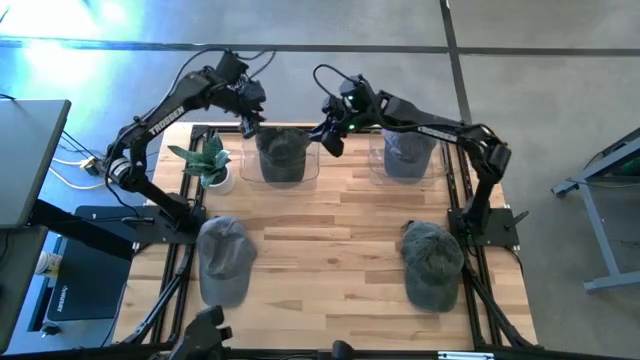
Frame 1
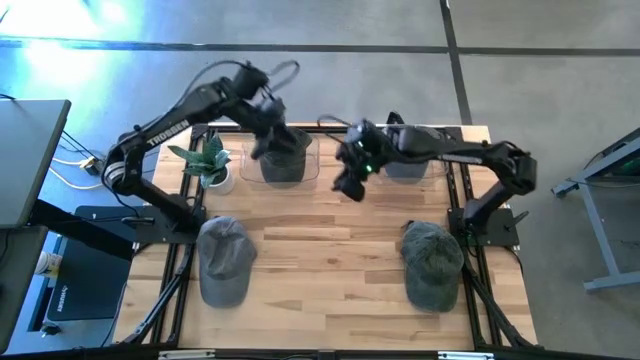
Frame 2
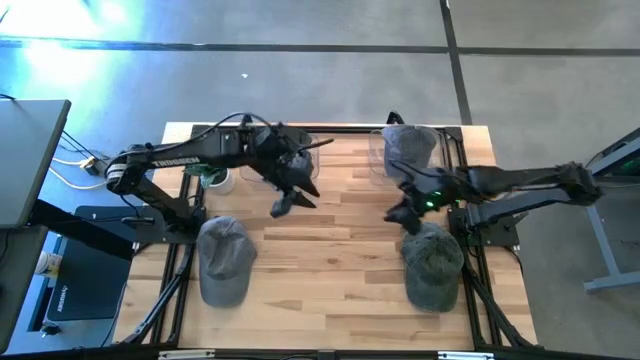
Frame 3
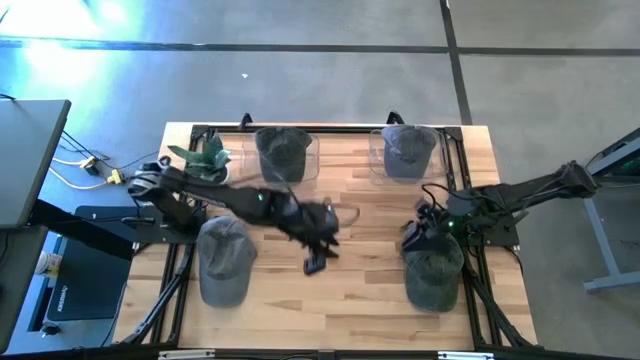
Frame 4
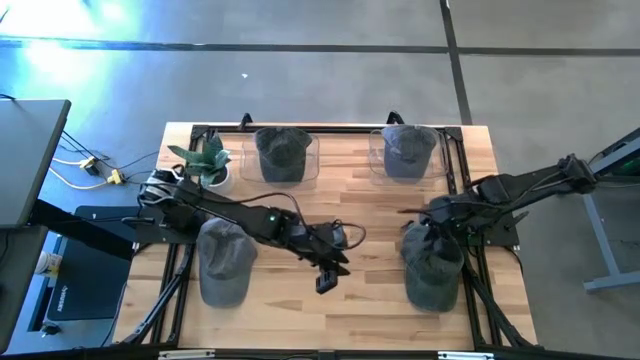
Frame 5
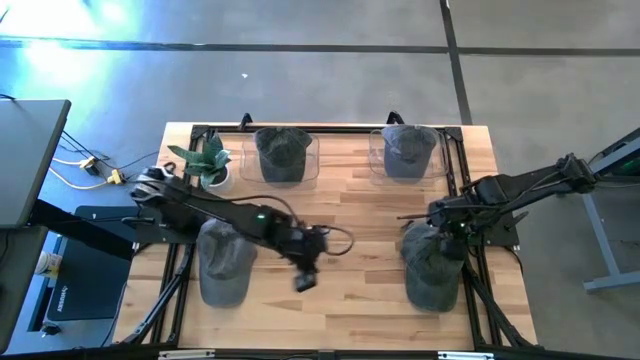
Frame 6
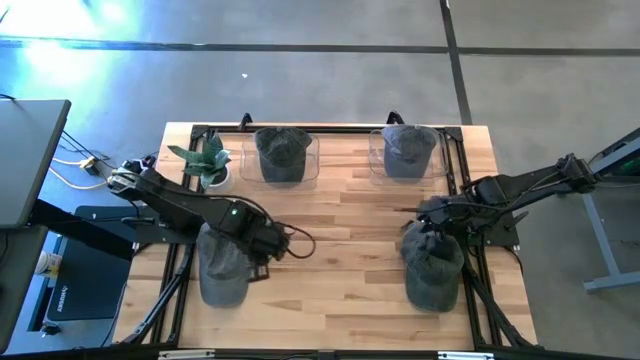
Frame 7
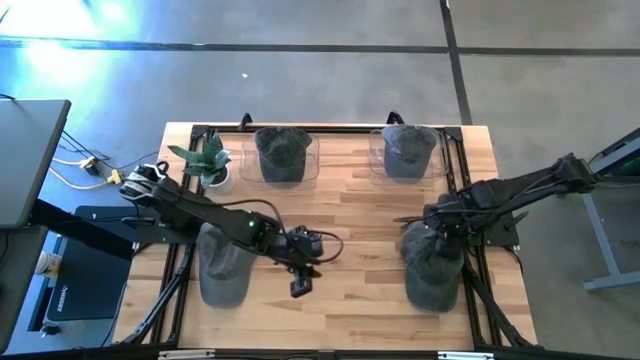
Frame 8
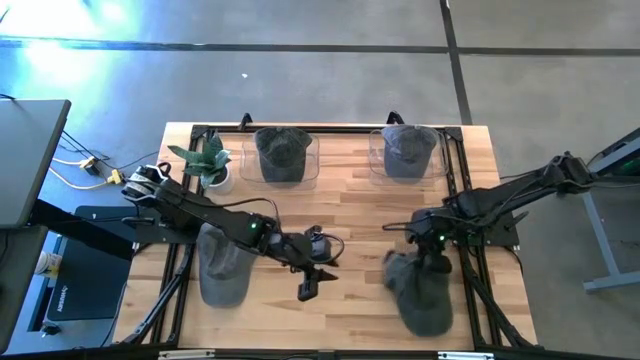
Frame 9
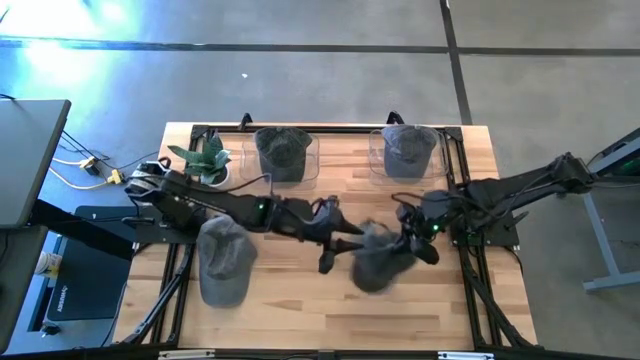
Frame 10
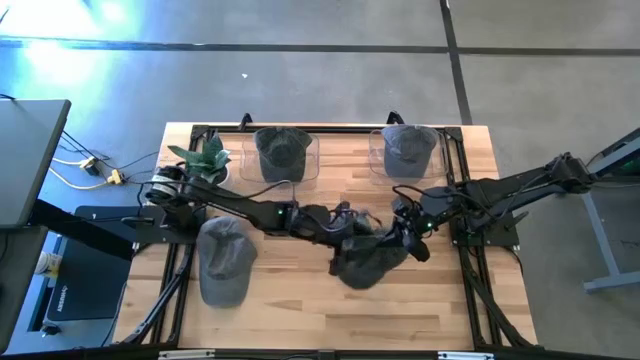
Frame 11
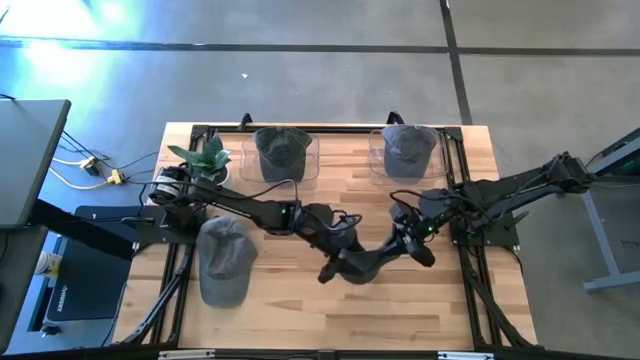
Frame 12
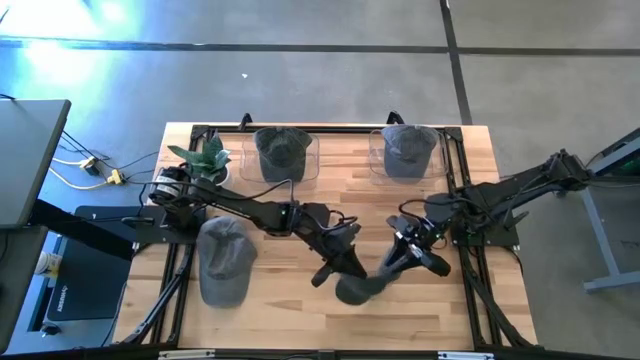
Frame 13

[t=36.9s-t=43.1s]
Task: Pick & Place hat
Put the black cap into the left transparent bin

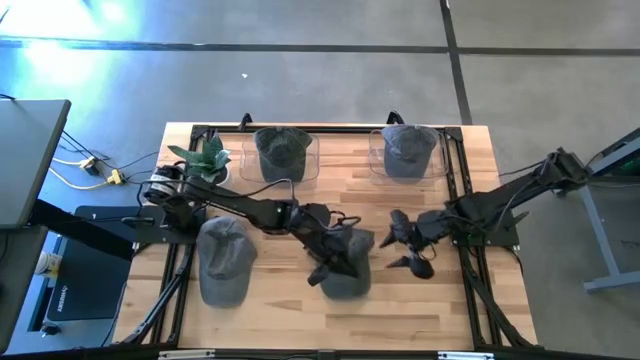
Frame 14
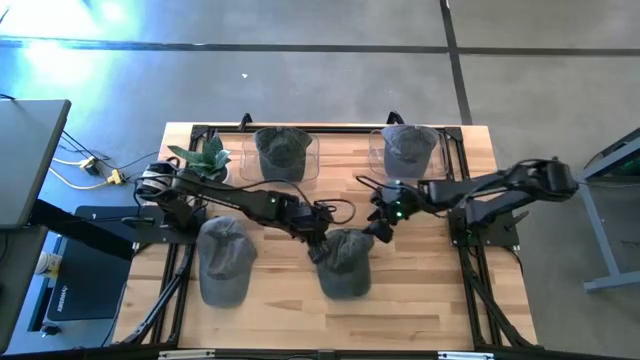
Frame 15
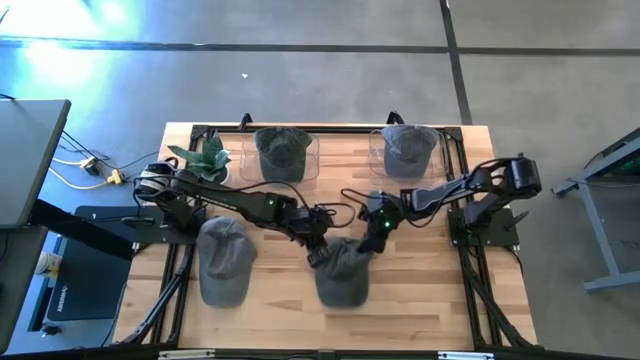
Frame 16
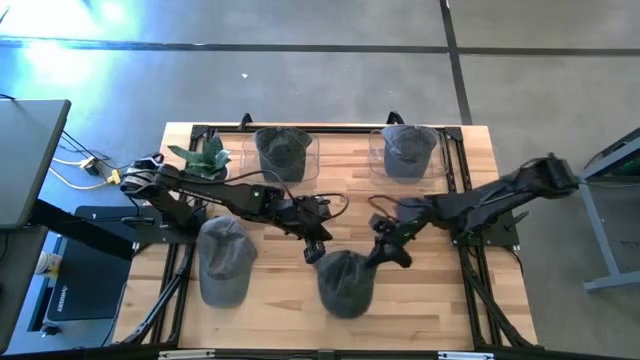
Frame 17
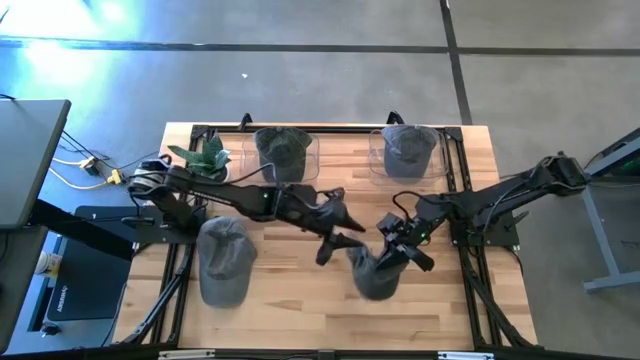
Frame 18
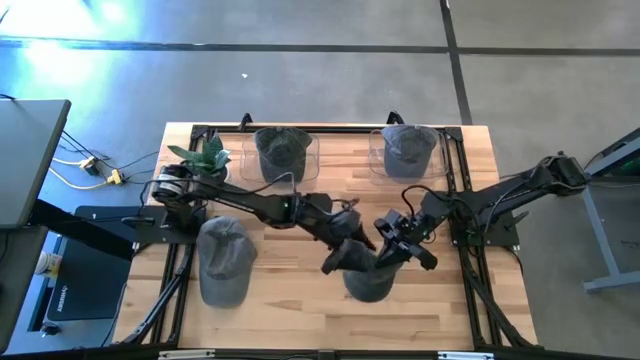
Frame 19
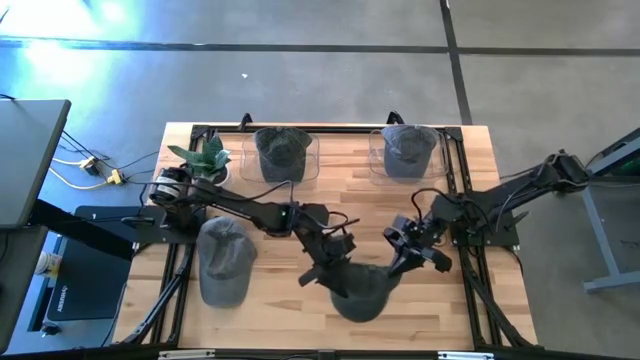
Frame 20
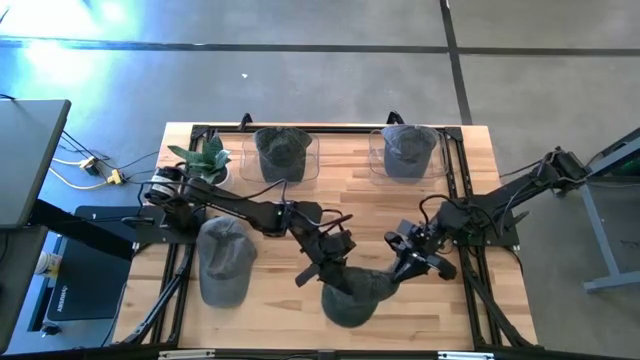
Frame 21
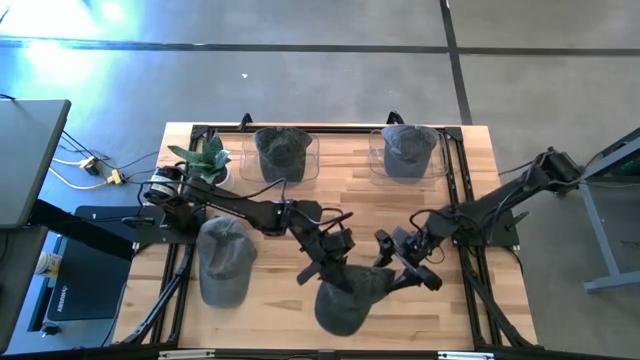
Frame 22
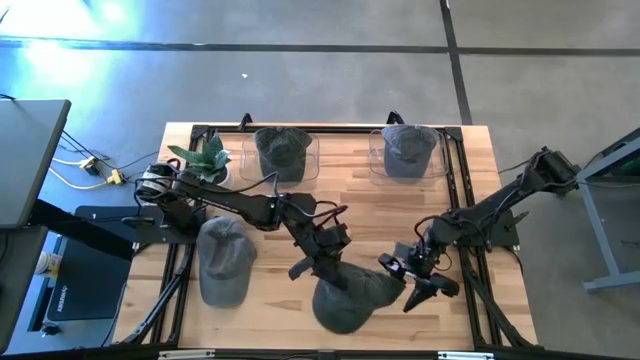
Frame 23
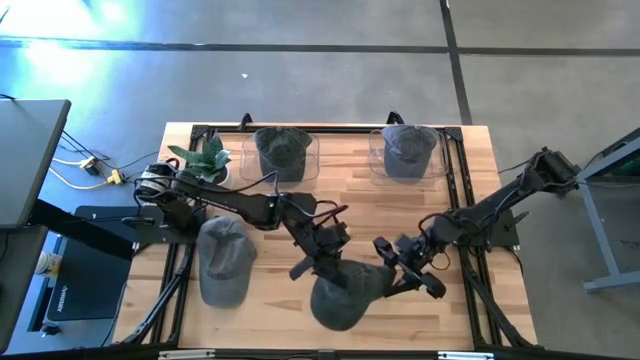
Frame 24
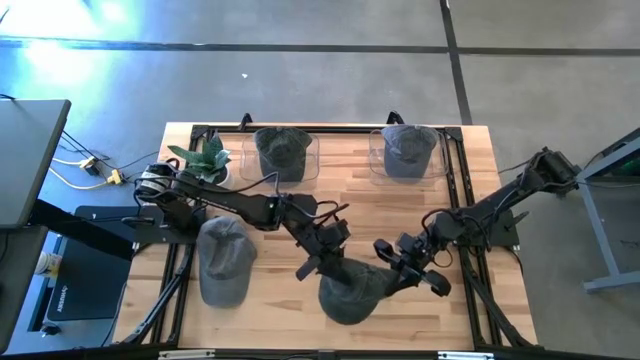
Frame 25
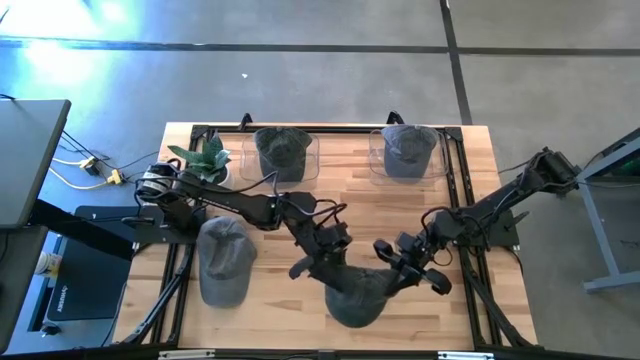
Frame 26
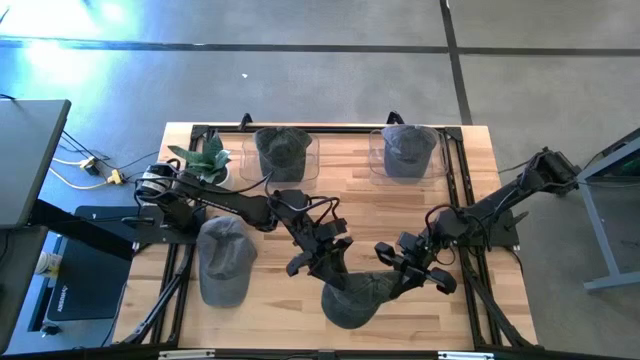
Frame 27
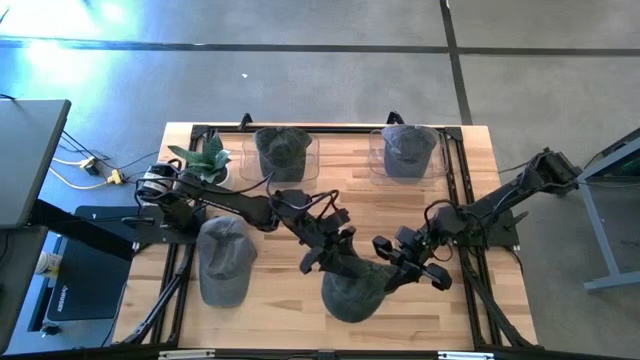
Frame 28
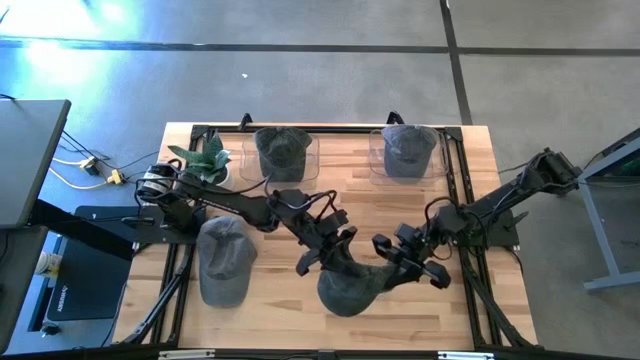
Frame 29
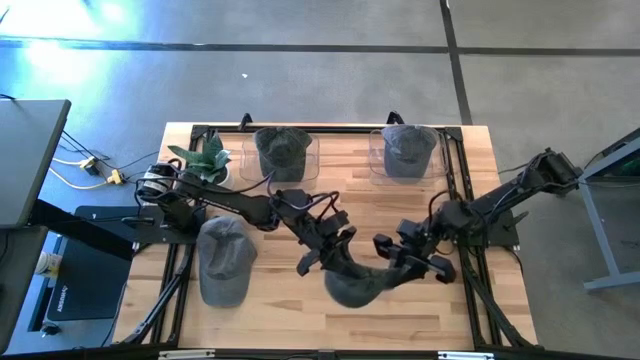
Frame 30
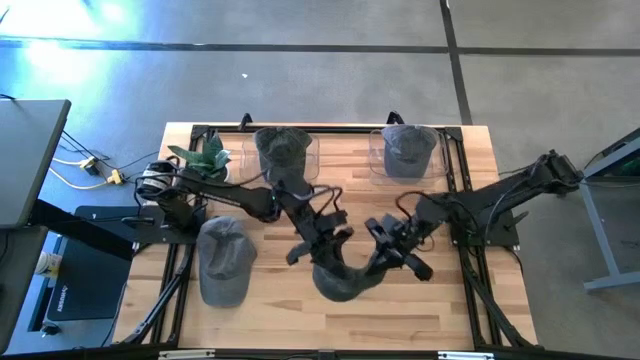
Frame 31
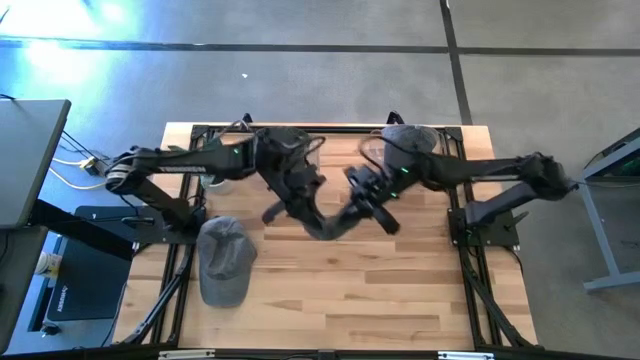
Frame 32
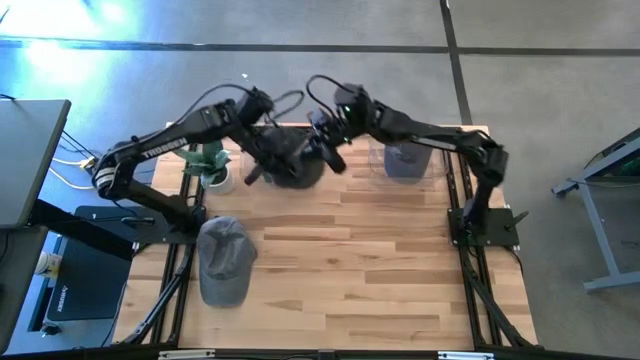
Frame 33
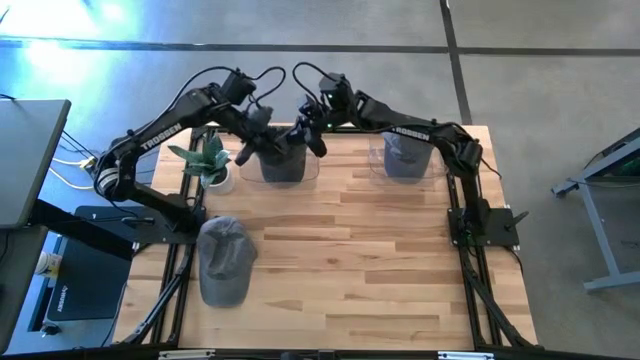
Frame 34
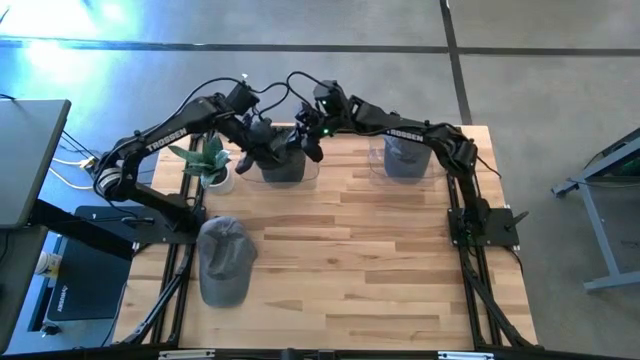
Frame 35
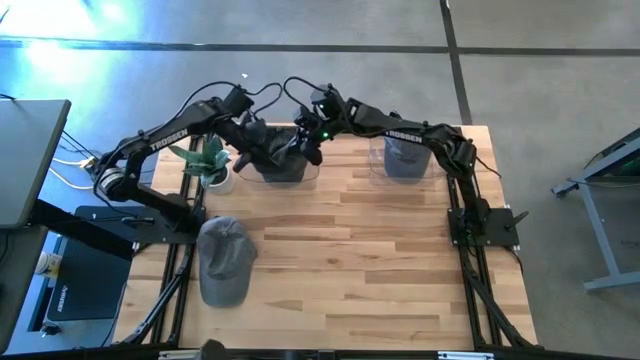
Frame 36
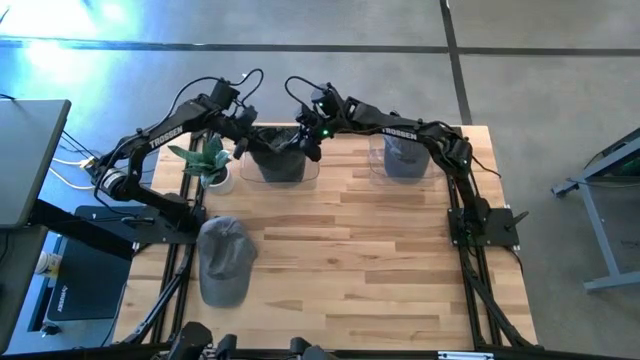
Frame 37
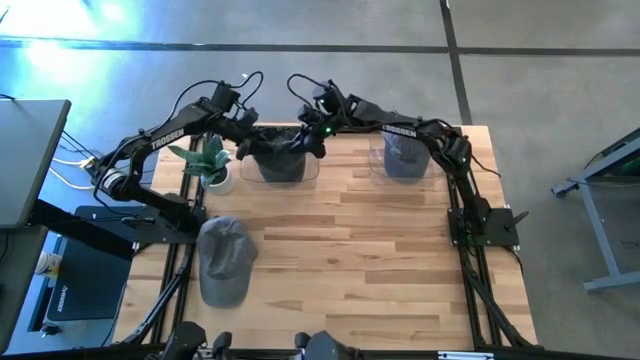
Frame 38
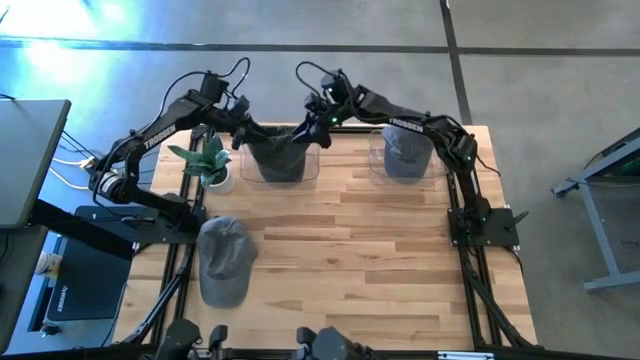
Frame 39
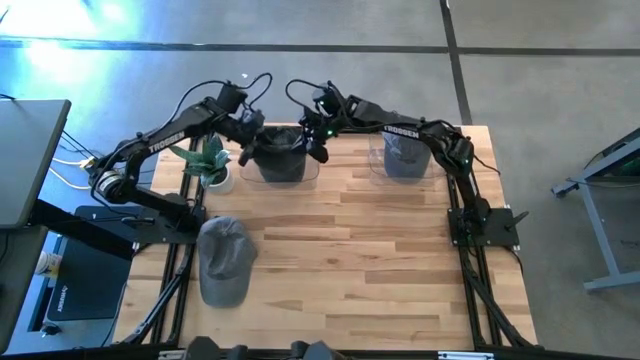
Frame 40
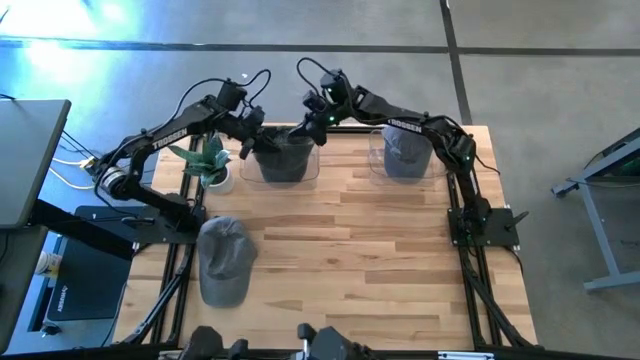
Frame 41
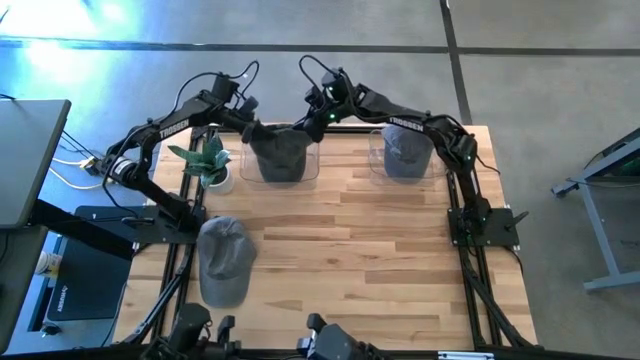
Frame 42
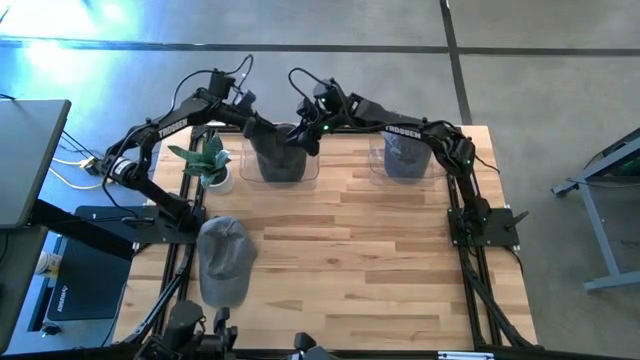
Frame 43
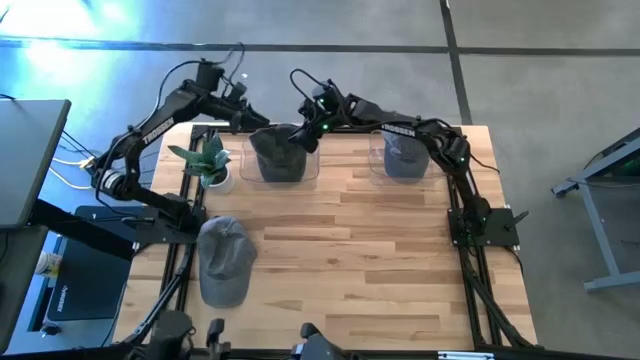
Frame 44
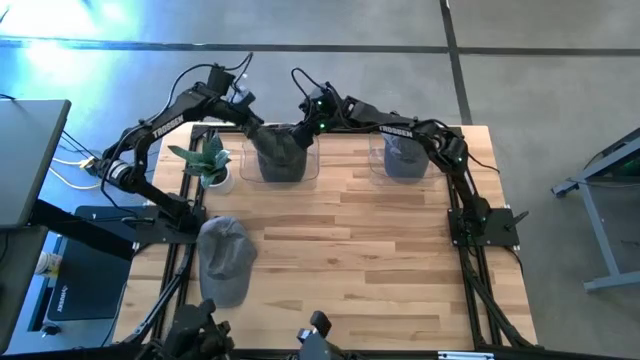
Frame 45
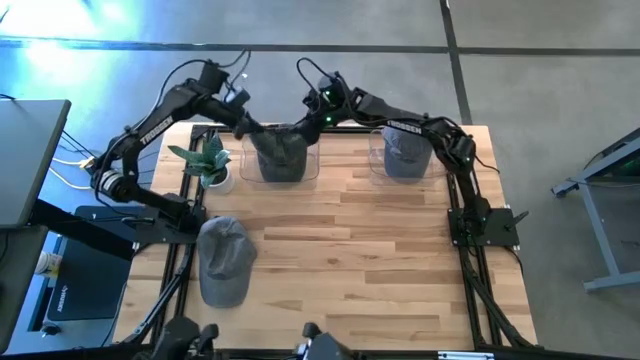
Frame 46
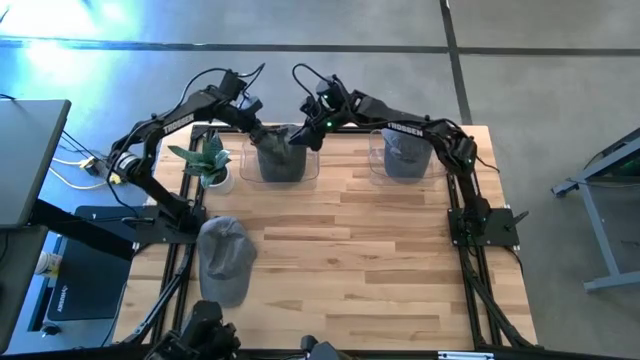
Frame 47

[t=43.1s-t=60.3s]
Put the black cap into the left transparent bin
